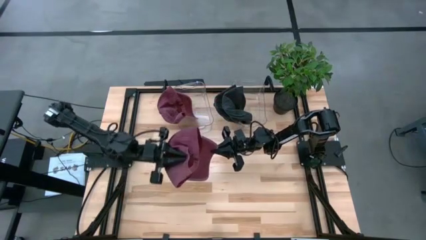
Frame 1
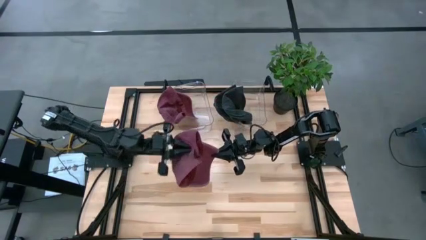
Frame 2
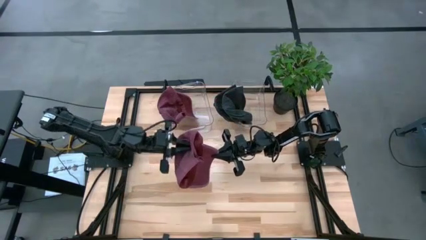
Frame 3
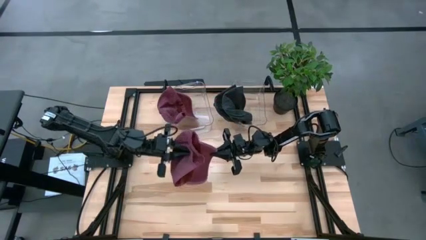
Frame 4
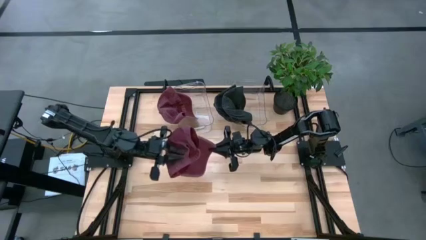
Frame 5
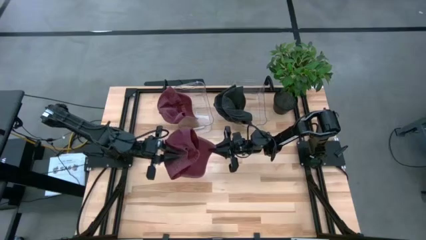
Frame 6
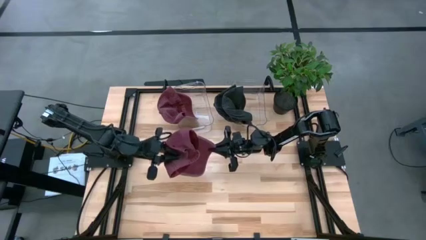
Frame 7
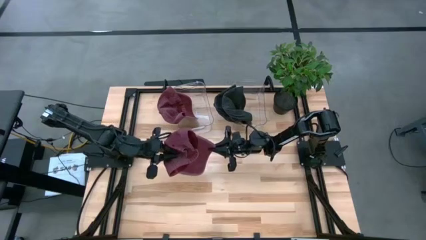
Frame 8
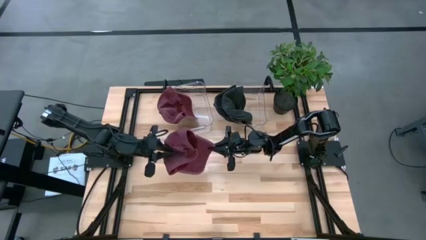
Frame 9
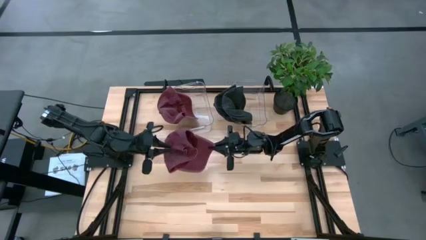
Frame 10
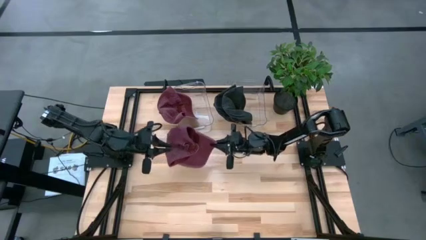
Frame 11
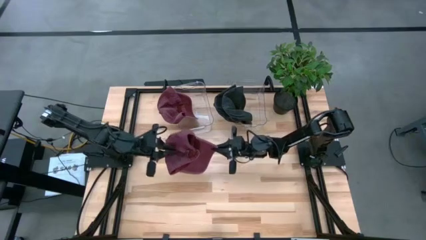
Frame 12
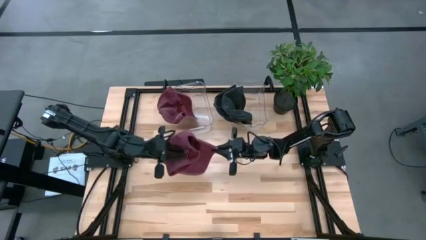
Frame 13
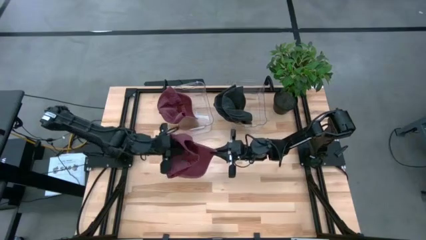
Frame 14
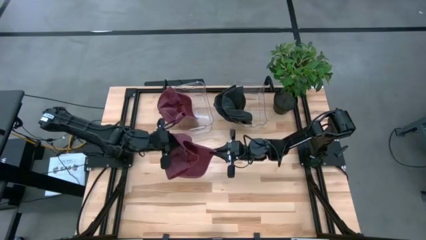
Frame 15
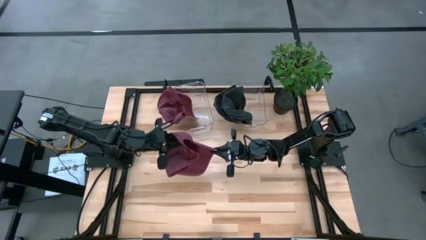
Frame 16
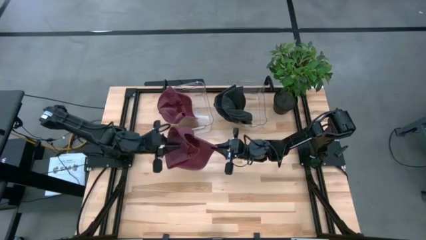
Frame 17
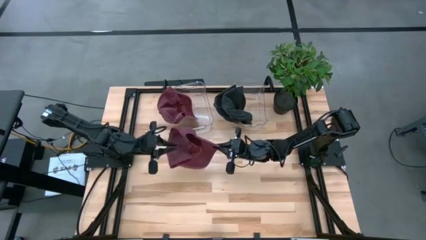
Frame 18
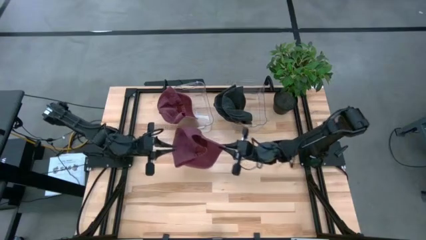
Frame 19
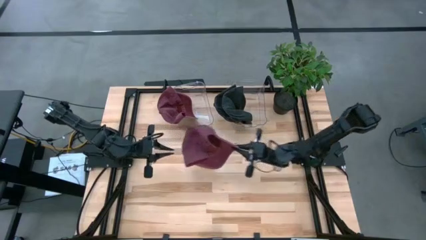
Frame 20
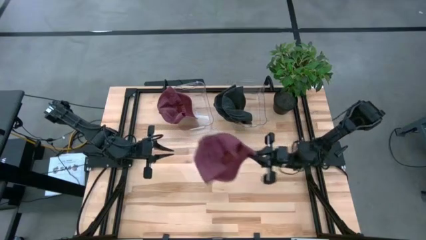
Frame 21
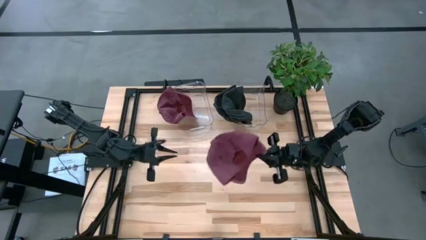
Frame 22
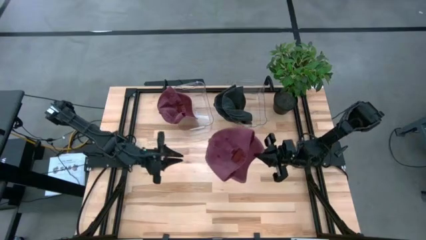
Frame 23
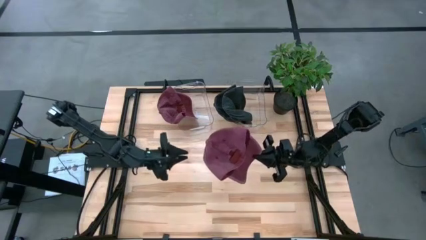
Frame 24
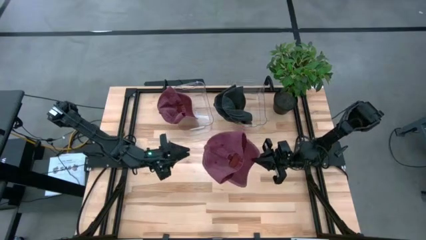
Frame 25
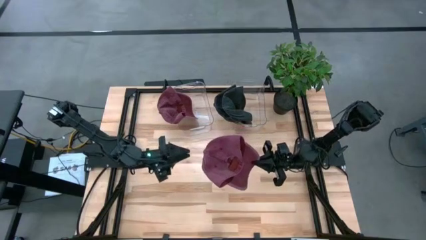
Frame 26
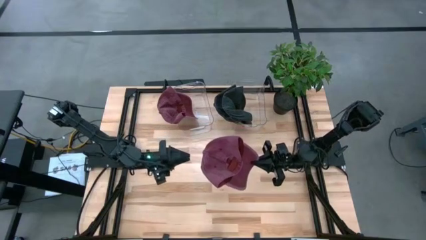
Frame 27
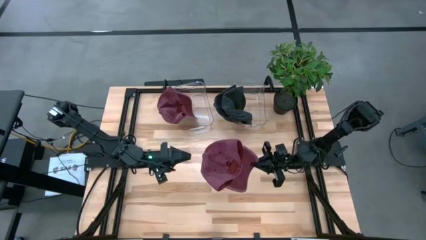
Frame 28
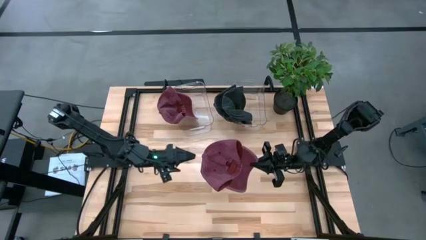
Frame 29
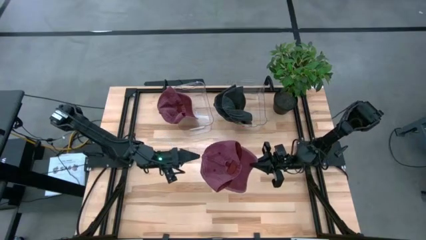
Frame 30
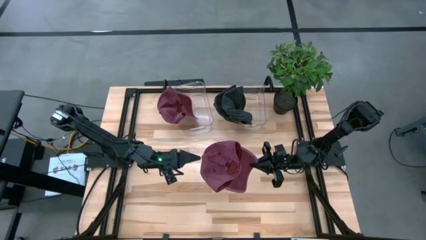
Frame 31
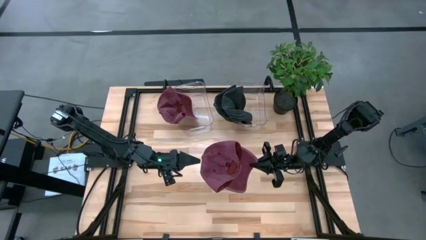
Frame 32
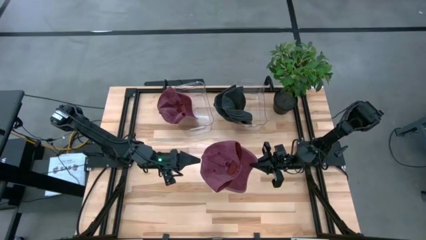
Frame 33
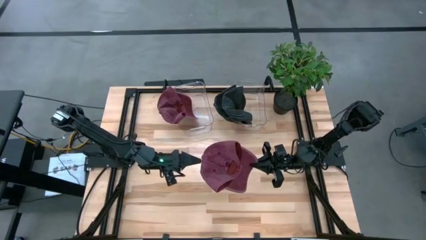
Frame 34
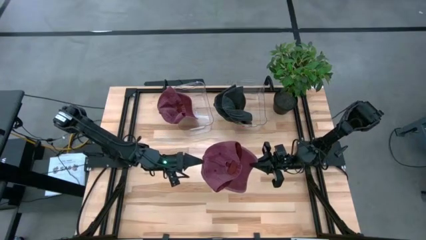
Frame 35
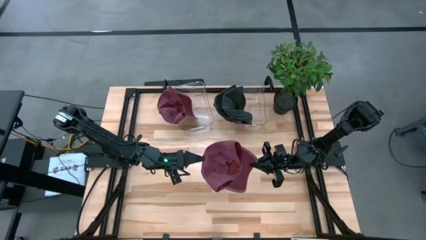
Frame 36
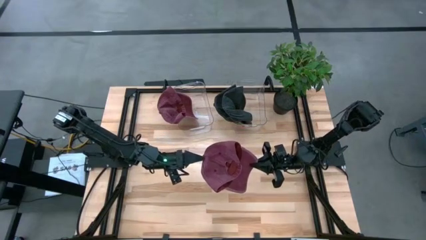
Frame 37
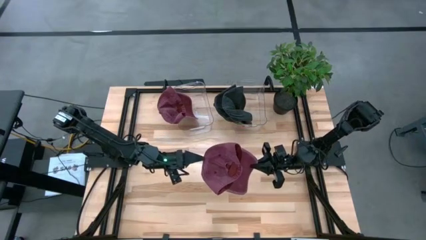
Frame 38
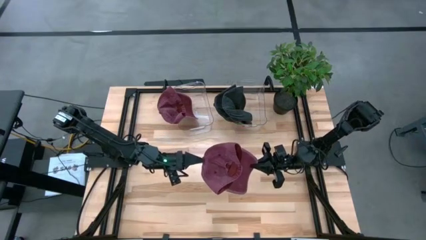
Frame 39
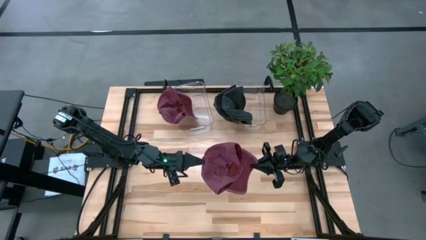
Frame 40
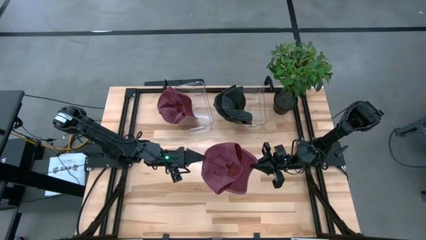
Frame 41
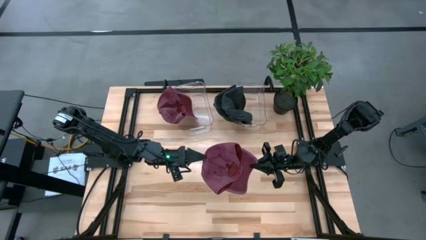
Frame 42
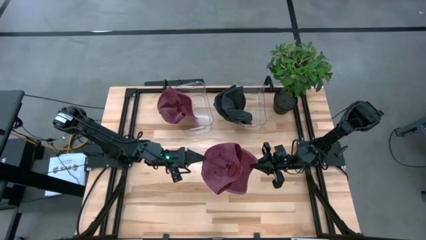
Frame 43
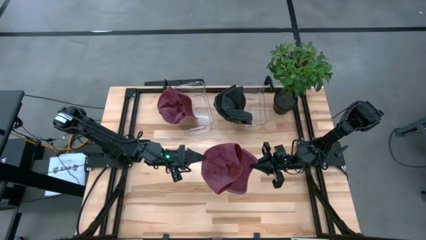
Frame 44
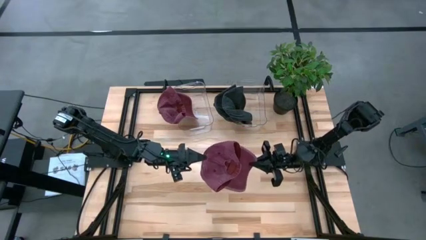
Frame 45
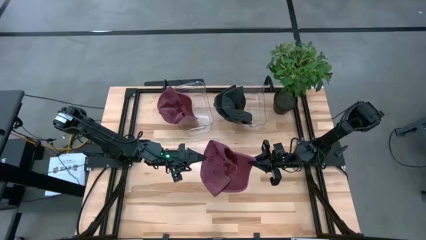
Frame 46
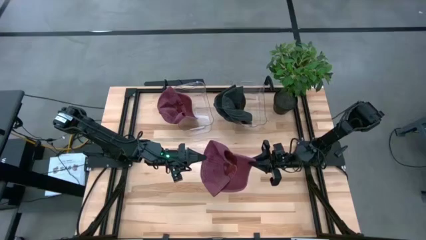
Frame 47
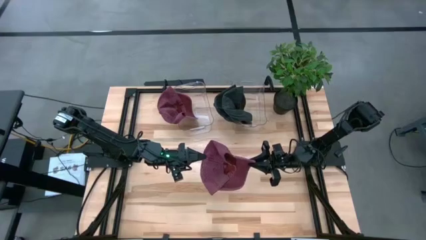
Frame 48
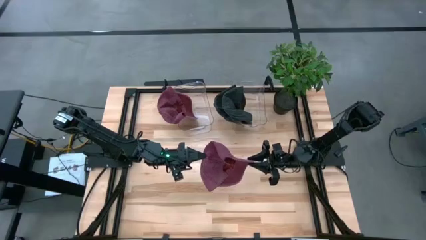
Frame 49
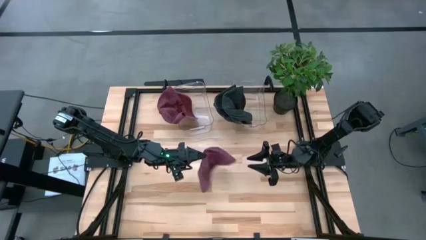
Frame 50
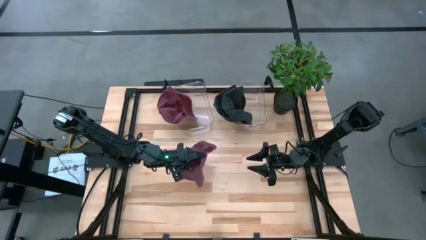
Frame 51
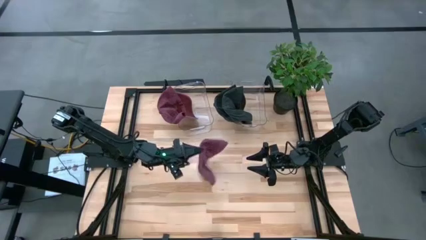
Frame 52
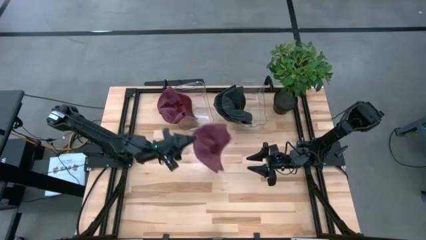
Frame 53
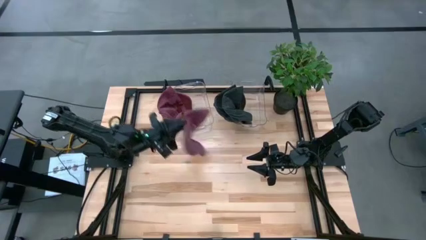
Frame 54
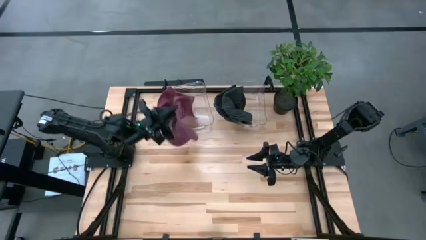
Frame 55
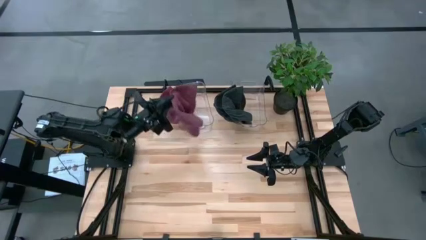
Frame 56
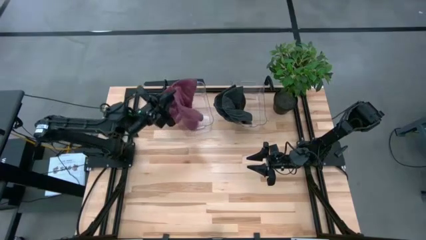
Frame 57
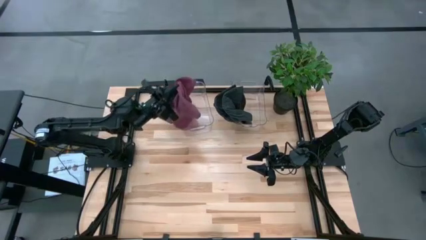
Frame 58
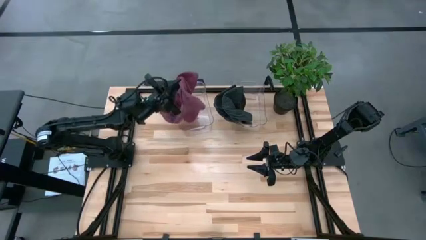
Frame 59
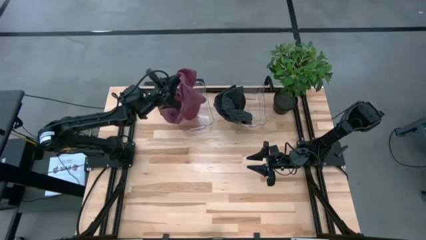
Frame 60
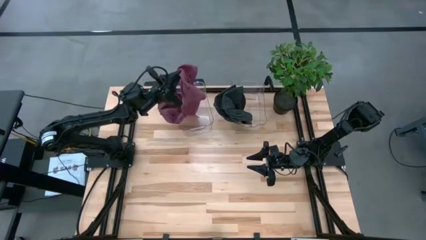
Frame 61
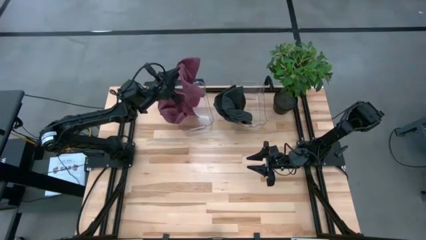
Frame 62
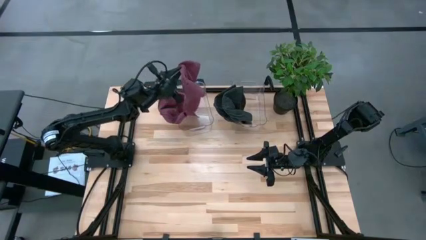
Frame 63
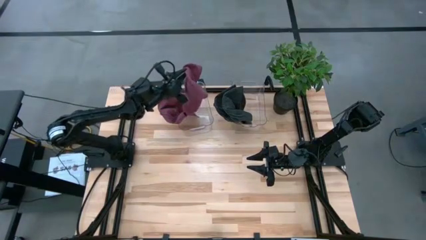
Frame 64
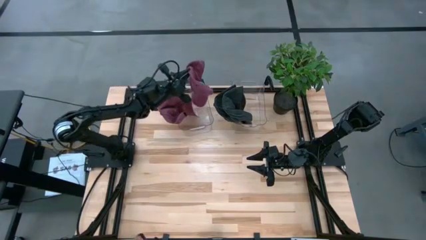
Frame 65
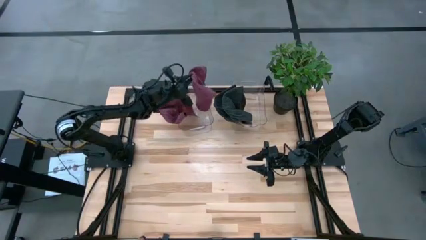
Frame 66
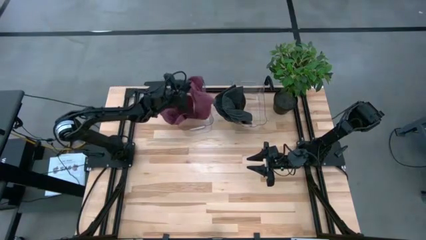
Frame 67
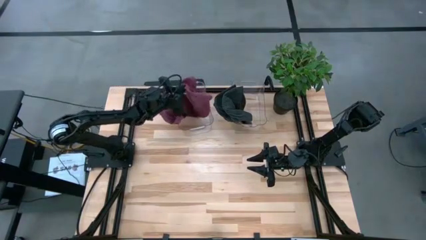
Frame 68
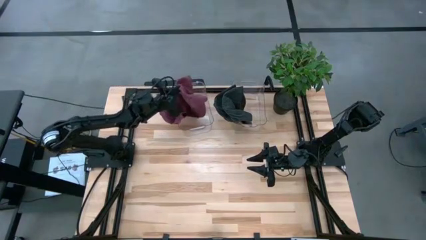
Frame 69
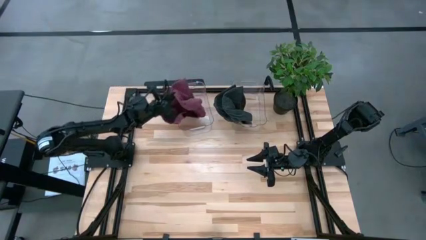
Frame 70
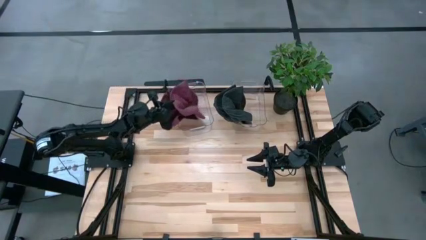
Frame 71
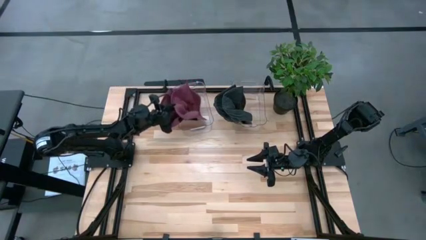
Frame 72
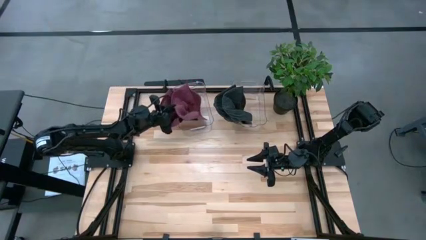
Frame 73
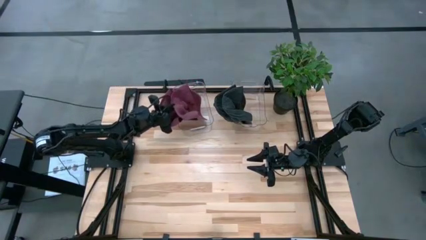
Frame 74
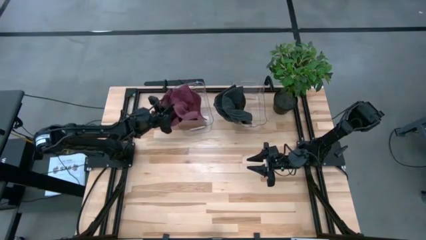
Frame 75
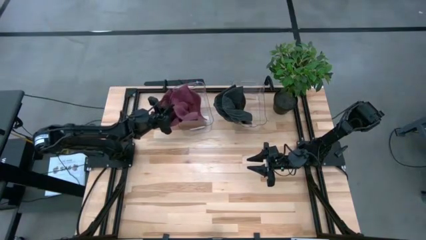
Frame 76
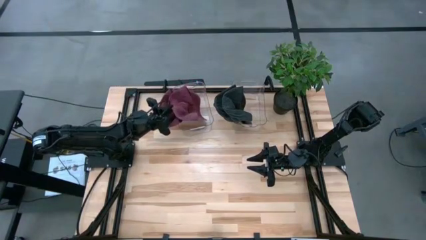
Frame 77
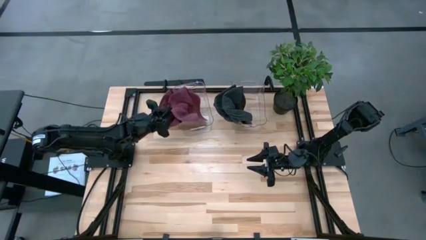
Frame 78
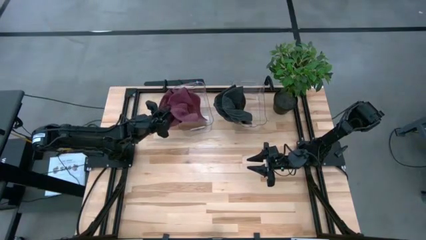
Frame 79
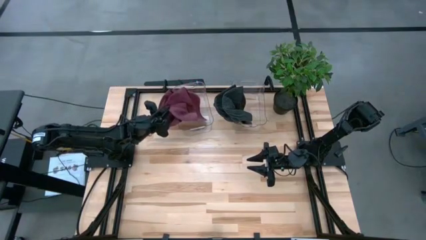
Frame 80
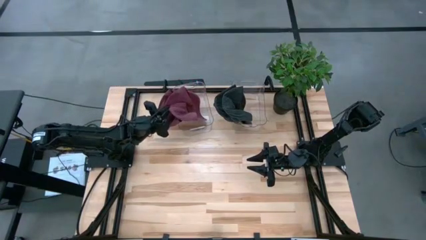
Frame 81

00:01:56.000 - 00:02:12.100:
Task: Pick & Place hat
Put the red cap in the left transparent bin
